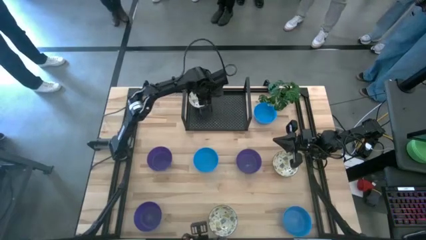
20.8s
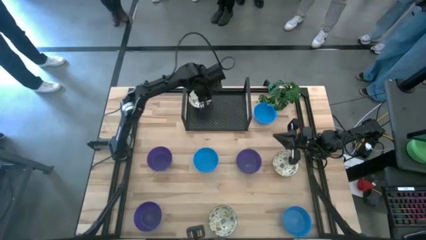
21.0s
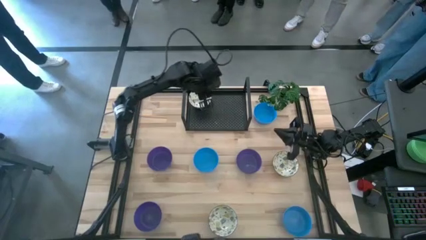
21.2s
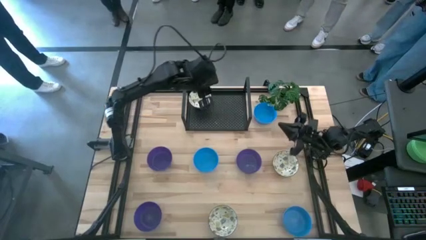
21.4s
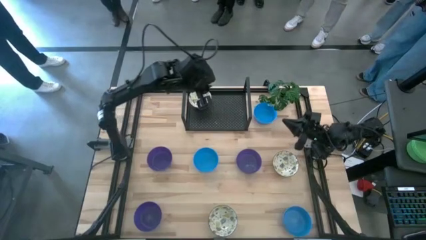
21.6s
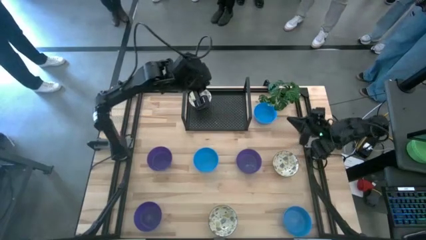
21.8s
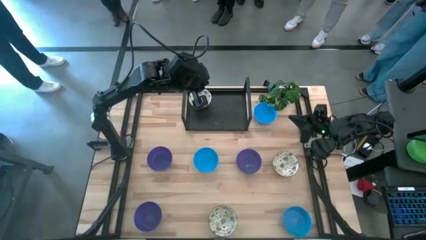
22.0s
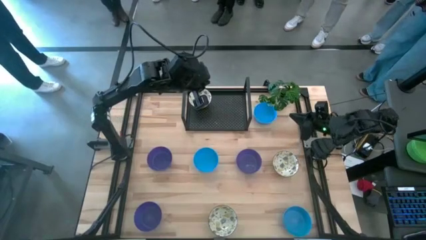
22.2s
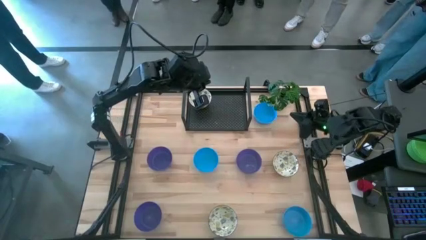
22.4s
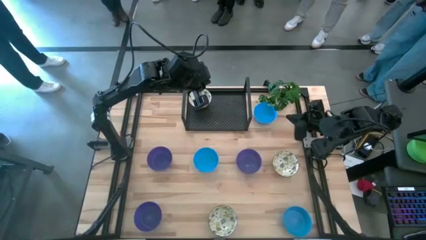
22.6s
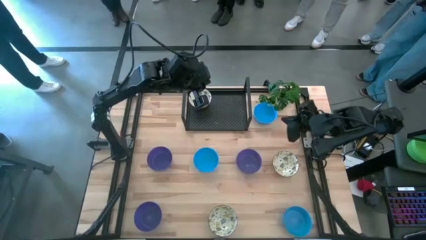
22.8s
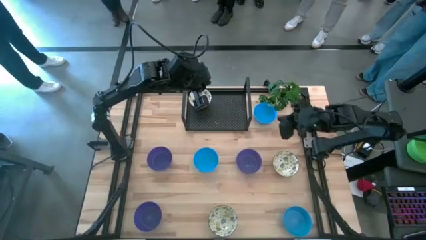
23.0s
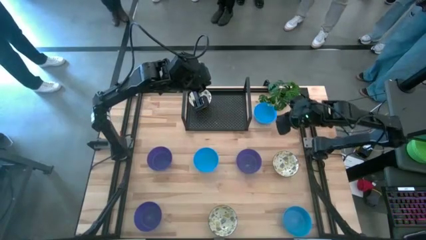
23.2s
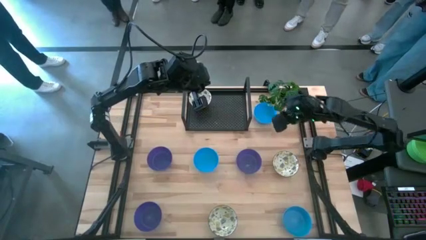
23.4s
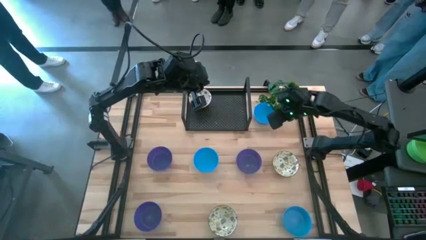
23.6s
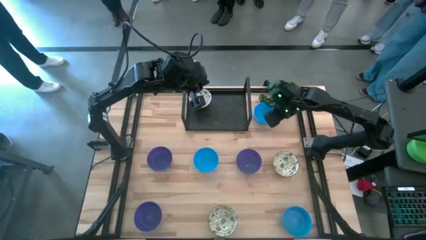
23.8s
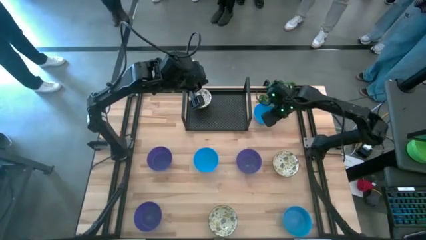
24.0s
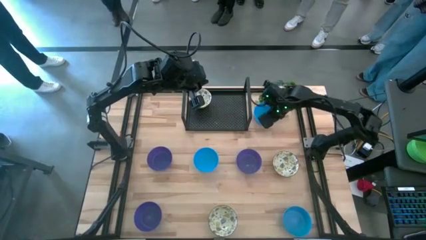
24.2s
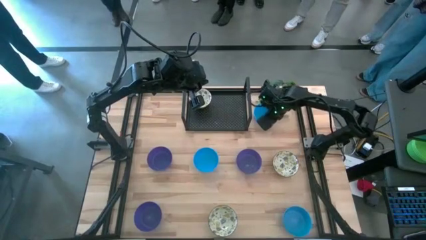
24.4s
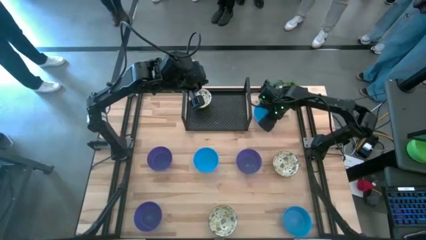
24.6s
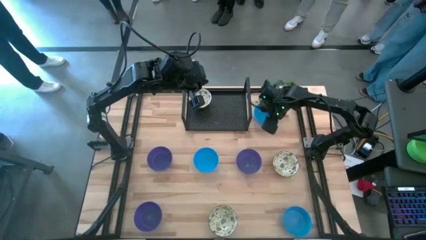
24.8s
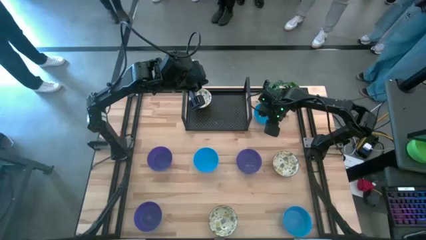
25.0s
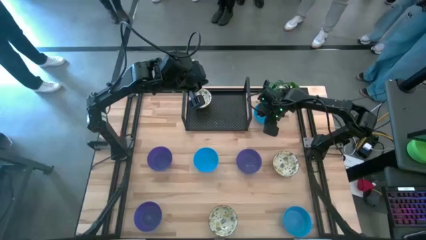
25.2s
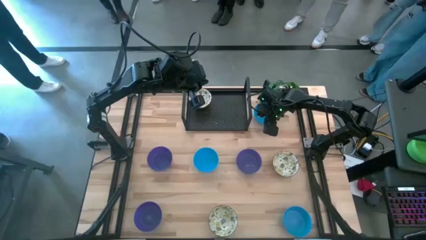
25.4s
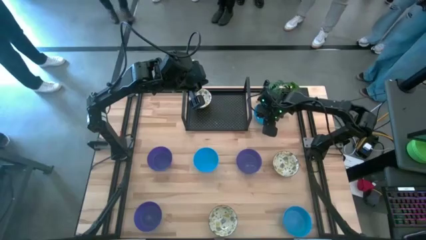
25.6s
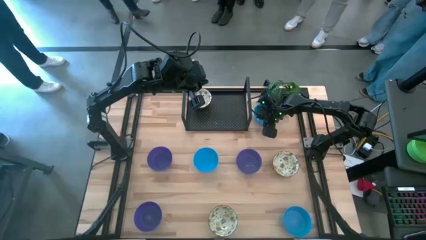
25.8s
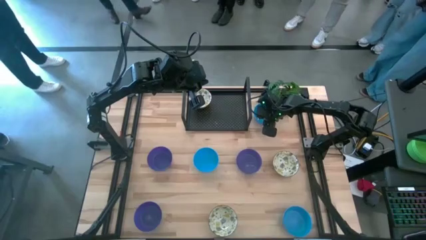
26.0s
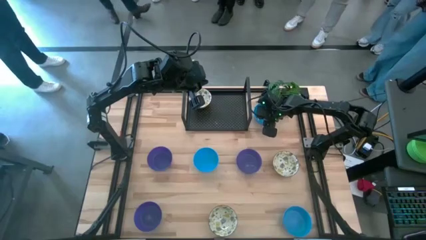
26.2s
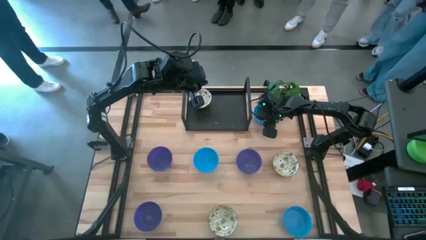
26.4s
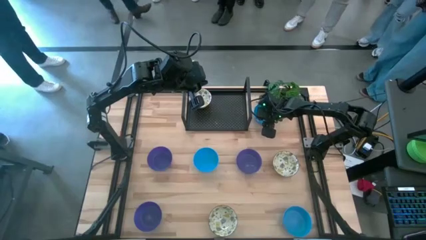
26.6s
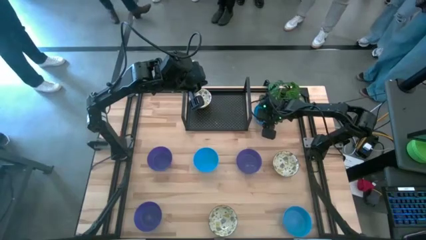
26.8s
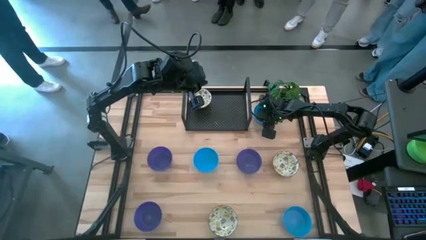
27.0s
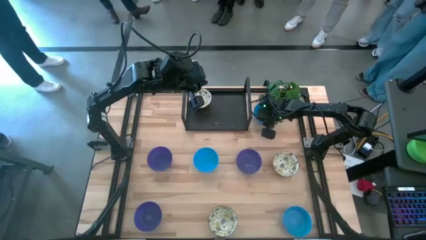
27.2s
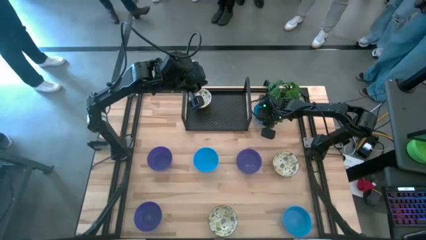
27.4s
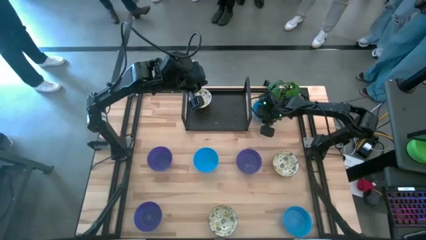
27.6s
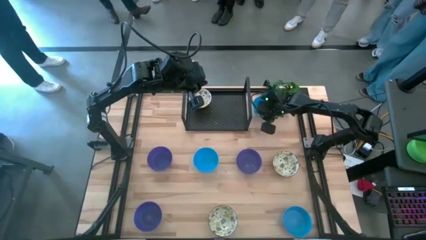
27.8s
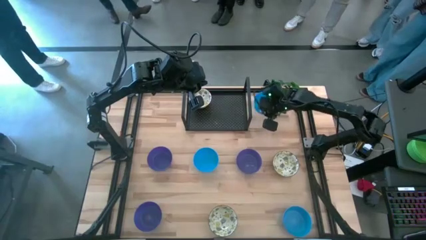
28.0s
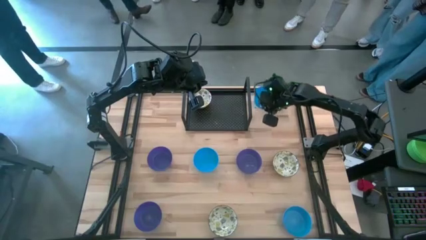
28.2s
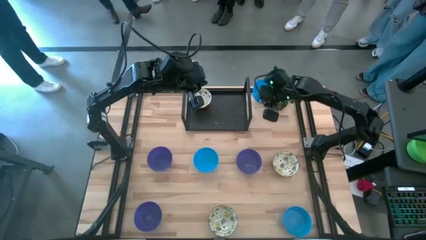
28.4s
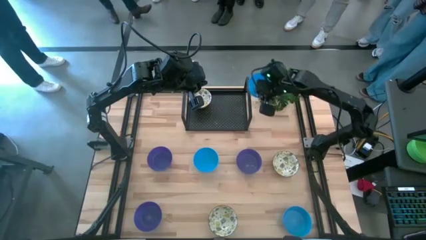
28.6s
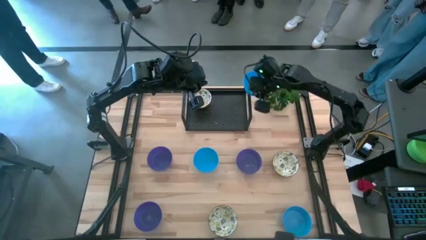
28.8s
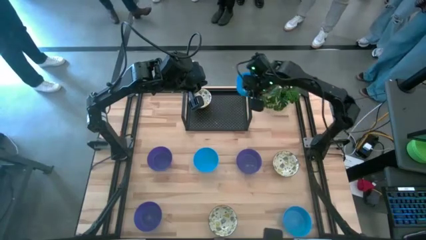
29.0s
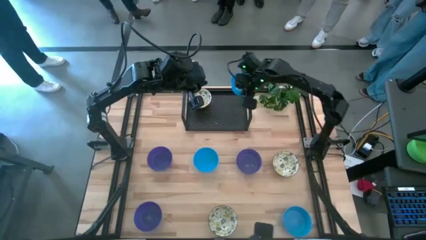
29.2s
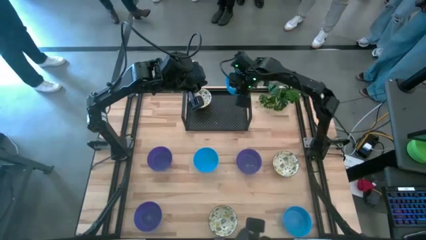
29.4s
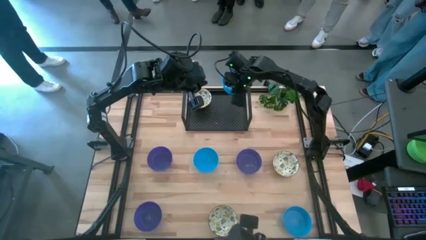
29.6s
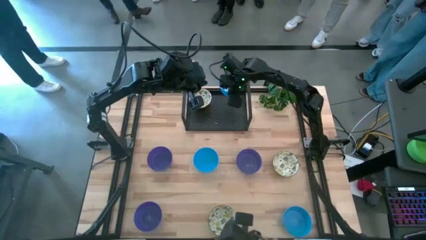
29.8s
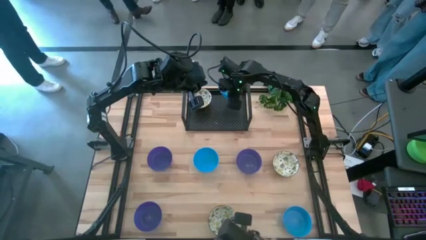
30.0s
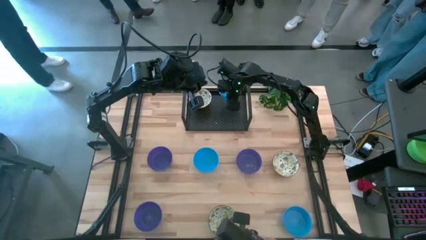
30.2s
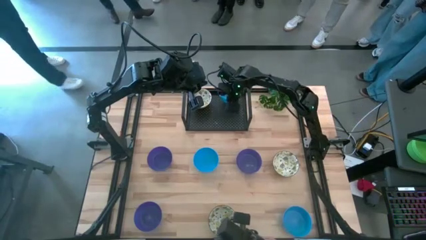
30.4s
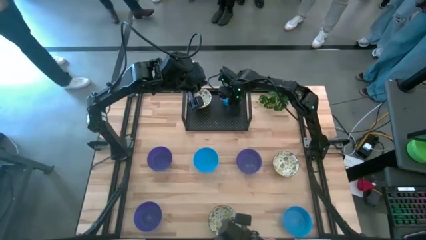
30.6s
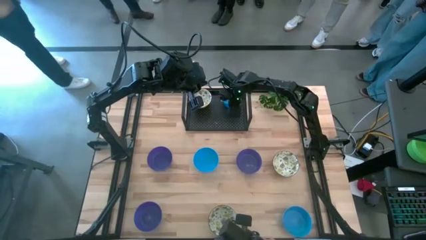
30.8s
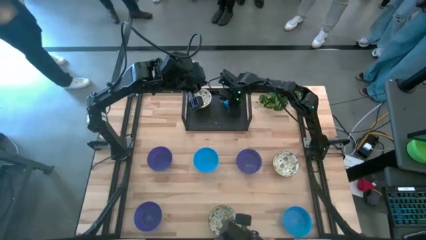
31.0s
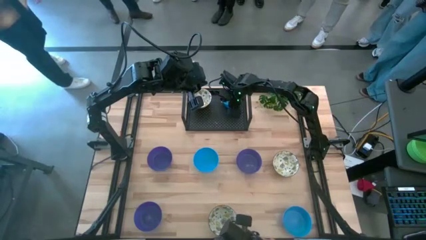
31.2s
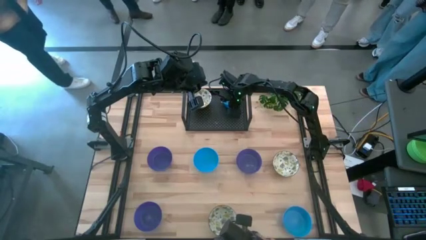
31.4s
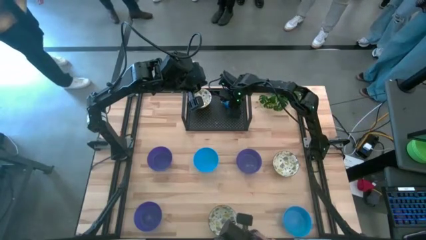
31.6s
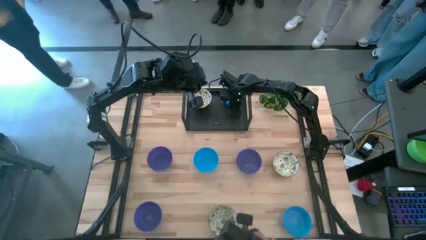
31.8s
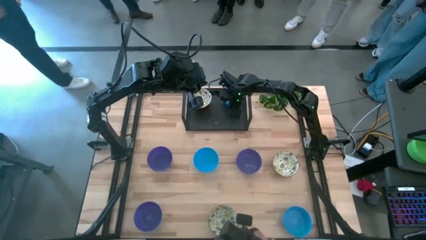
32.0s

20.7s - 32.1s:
Task: Pick & Place Mini bowls
Put the top blue bowl on the shelf

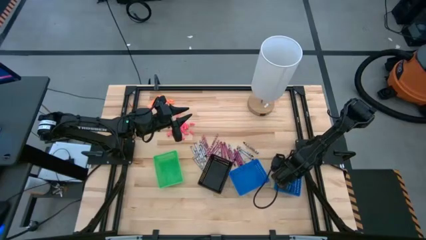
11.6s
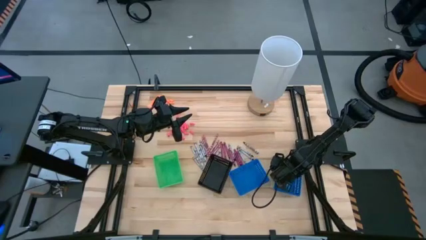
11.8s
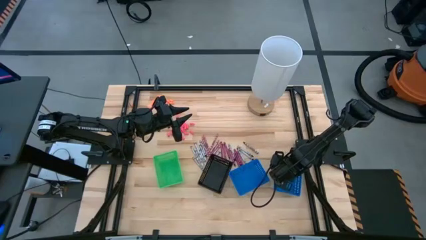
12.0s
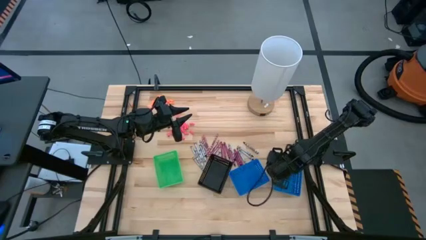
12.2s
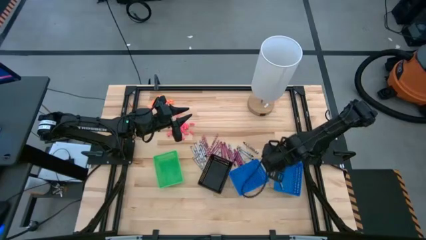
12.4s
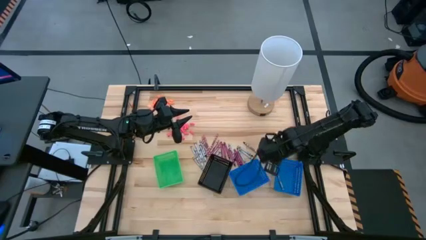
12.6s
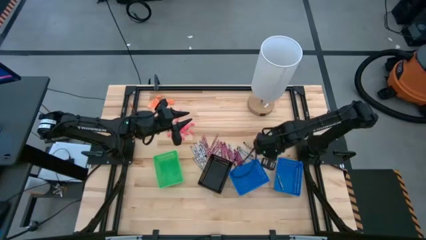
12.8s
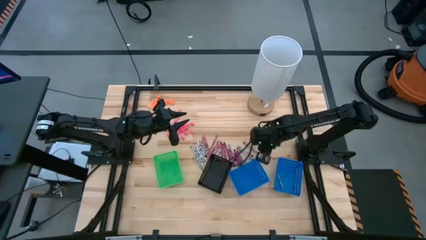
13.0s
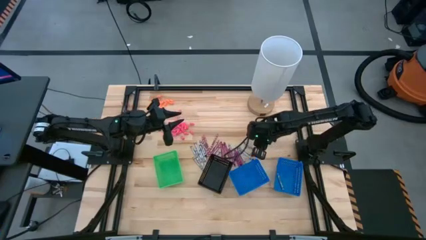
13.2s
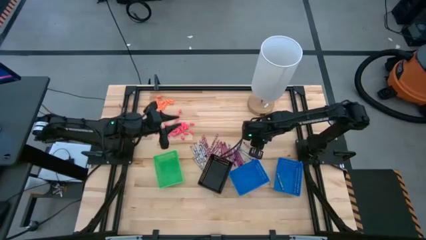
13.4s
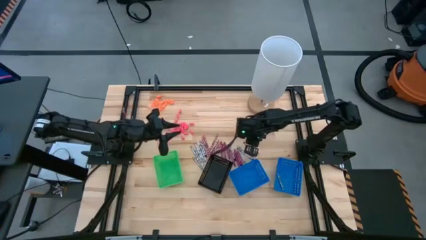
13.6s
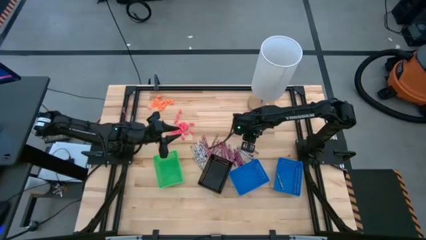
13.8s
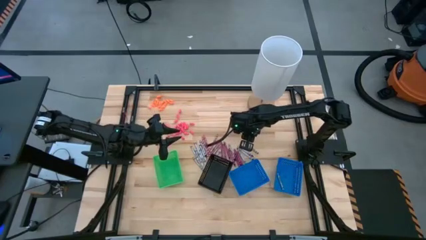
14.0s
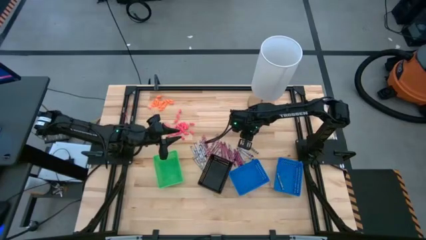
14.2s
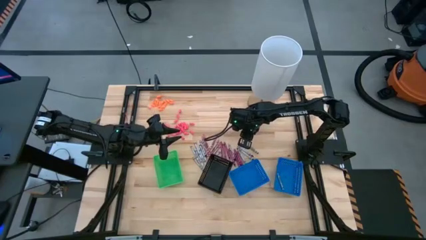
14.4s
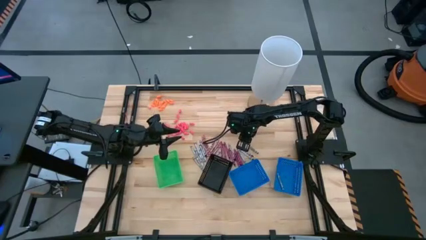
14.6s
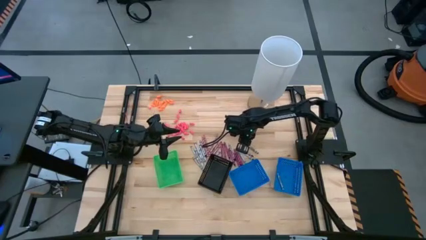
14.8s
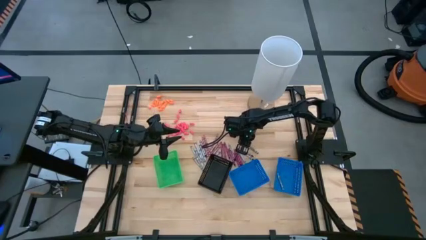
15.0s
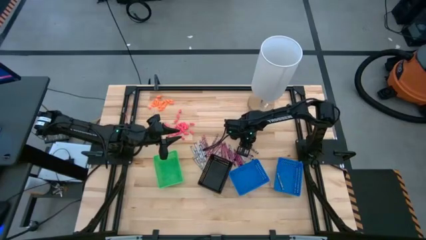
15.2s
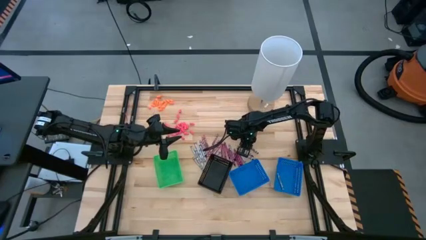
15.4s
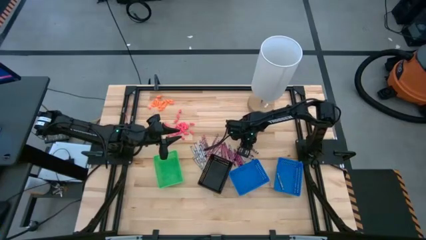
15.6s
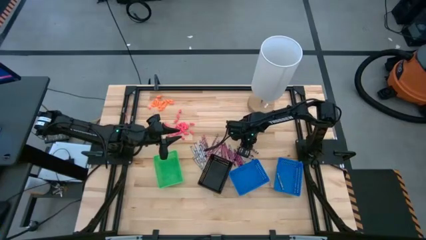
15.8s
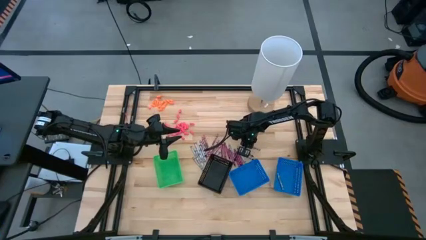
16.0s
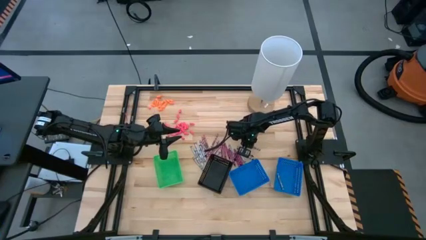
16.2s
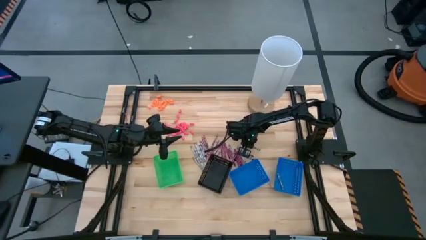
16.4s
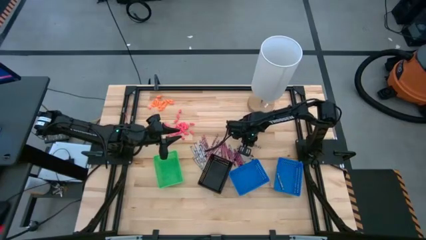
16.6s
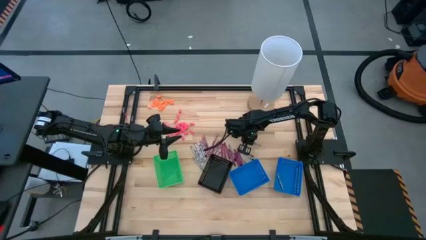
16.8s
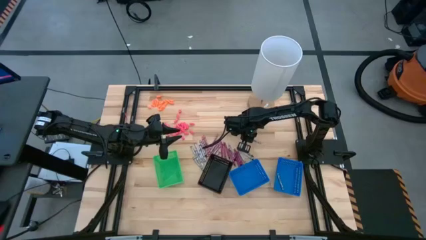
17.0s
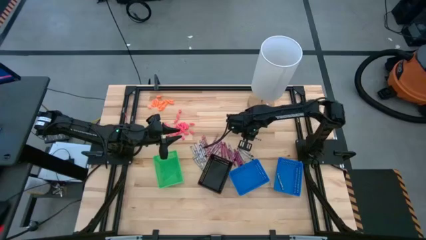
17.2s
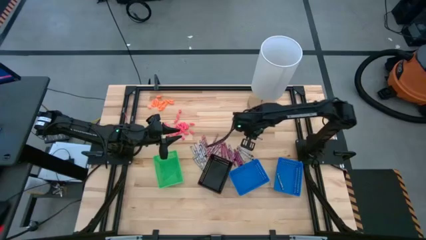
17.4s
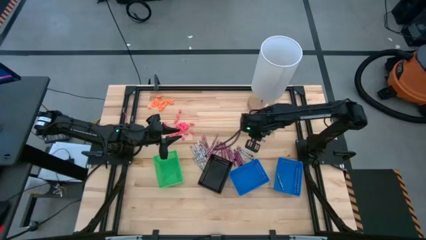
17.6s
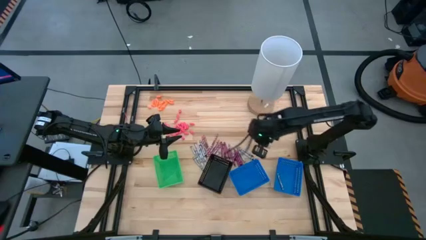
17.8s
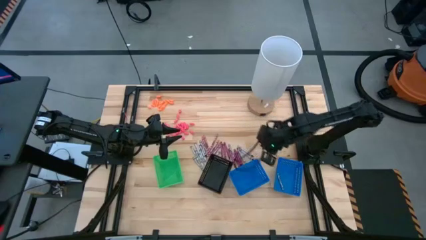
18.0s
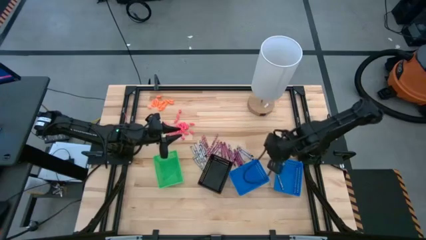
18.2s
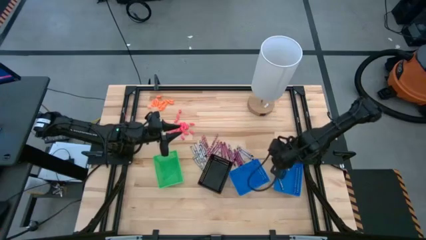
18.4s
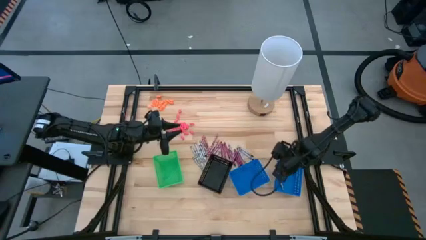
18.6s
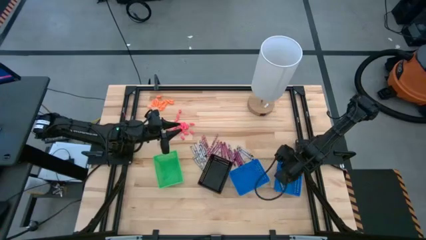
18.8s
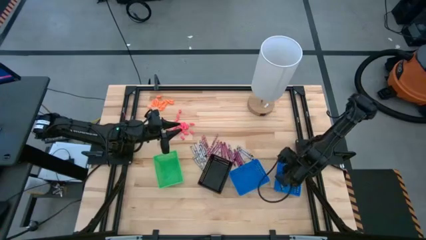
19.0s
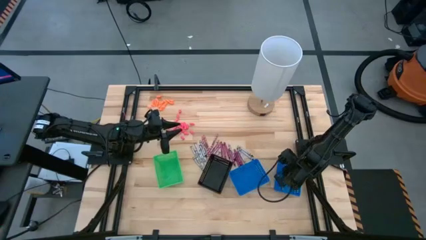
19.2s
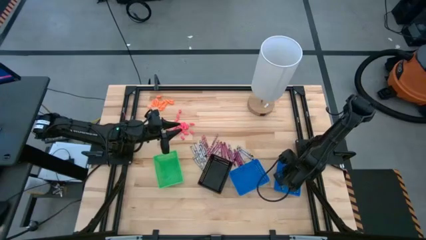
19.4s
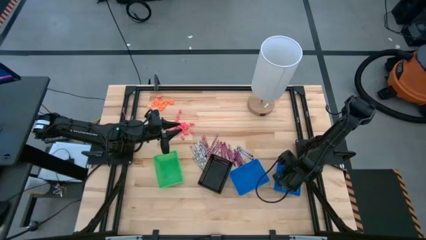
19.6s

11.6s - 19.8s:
Task: Sort crayons
Put the black crayon into the right blue bin
